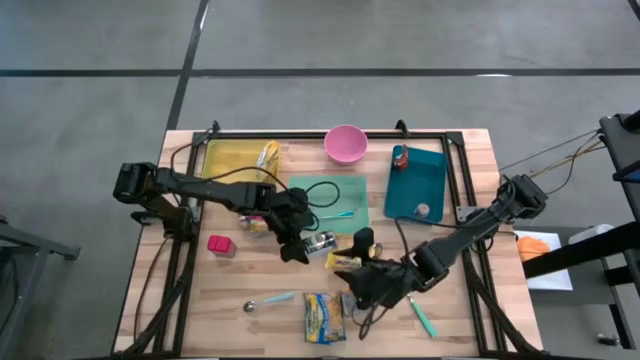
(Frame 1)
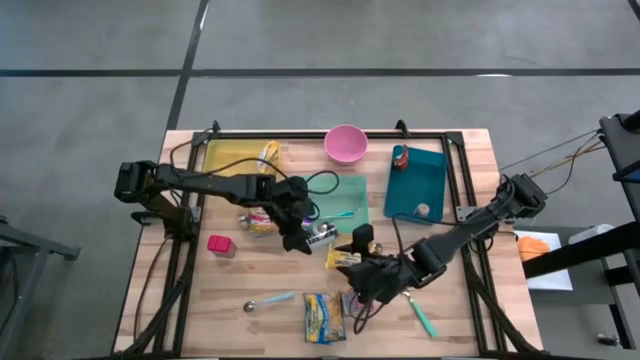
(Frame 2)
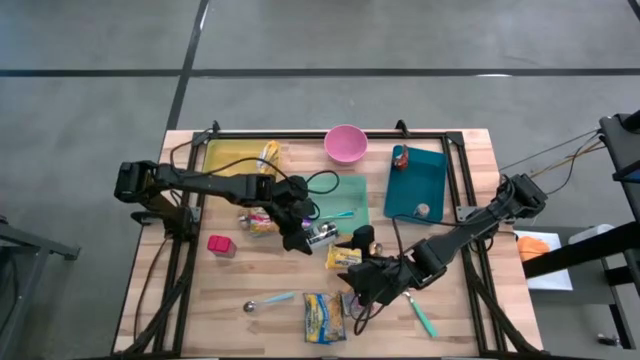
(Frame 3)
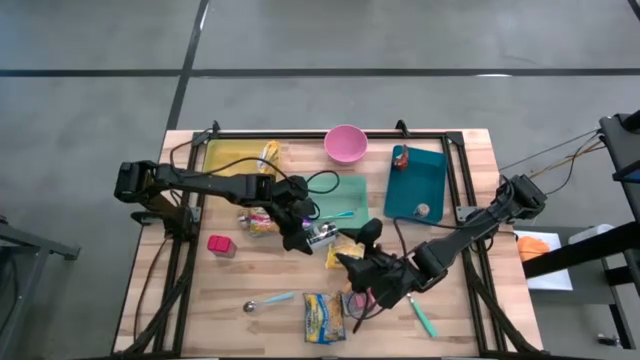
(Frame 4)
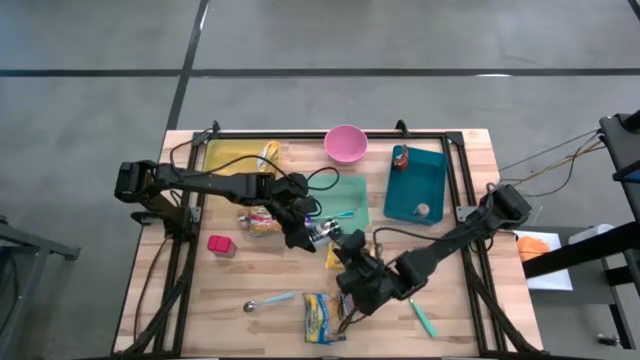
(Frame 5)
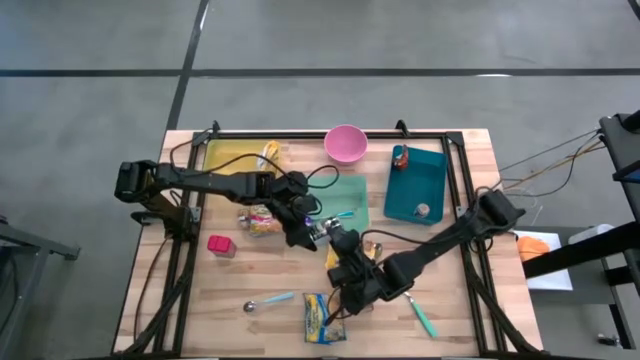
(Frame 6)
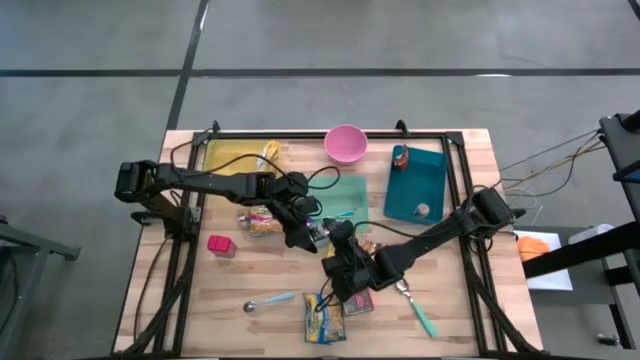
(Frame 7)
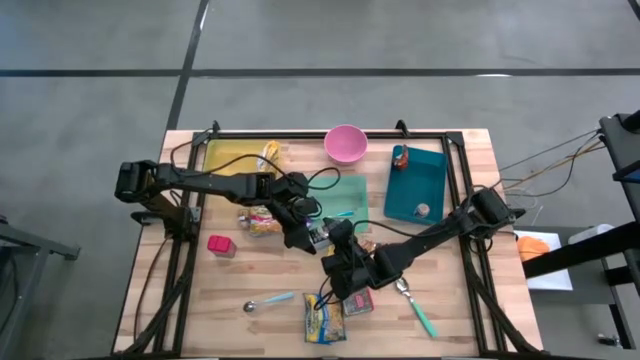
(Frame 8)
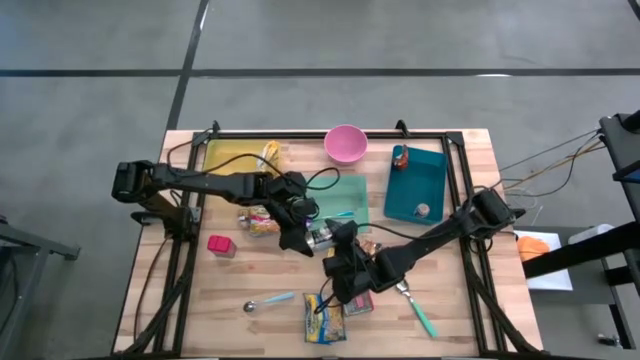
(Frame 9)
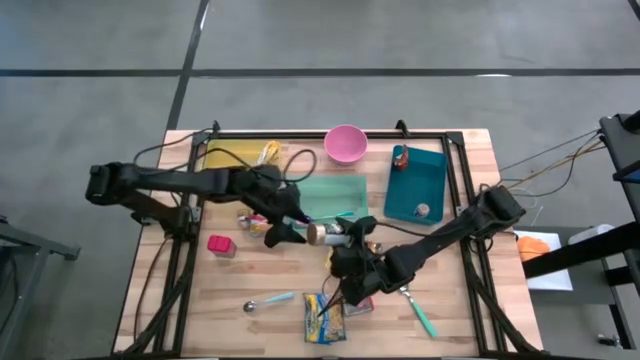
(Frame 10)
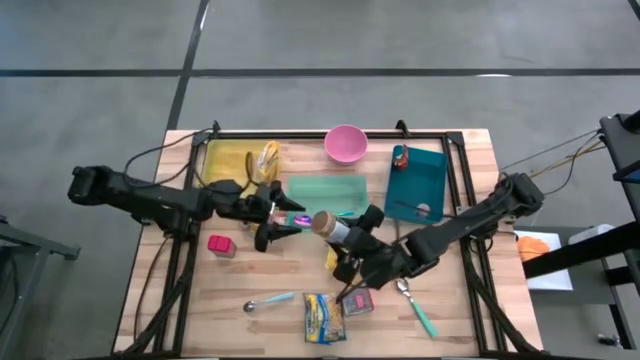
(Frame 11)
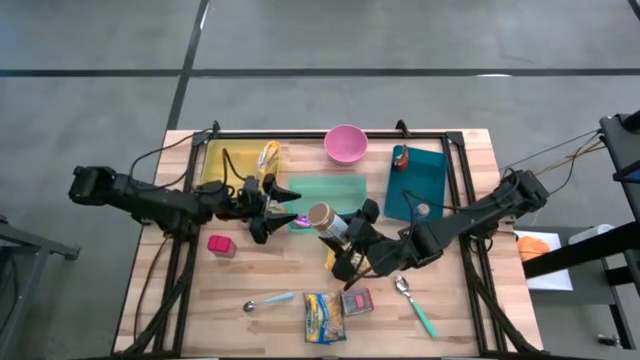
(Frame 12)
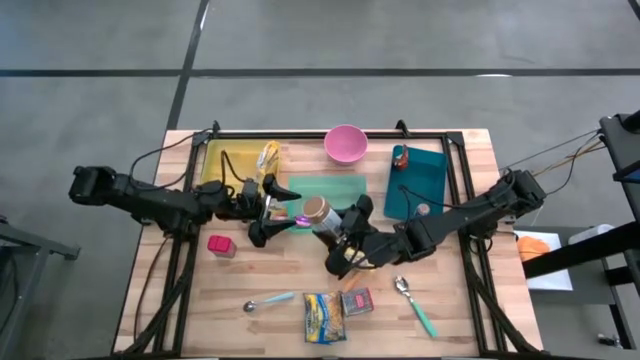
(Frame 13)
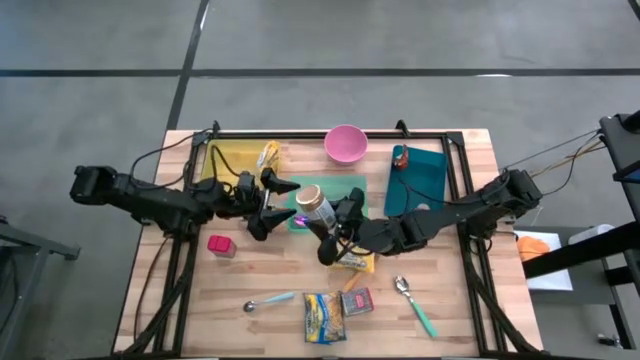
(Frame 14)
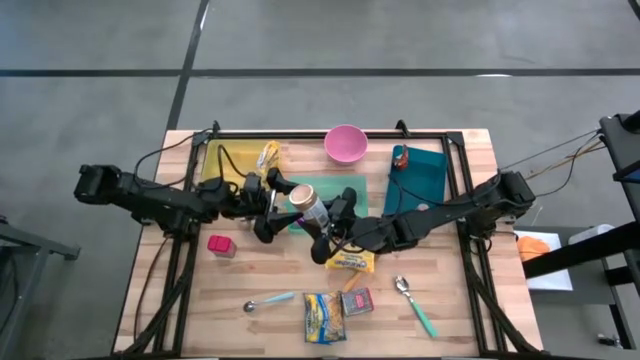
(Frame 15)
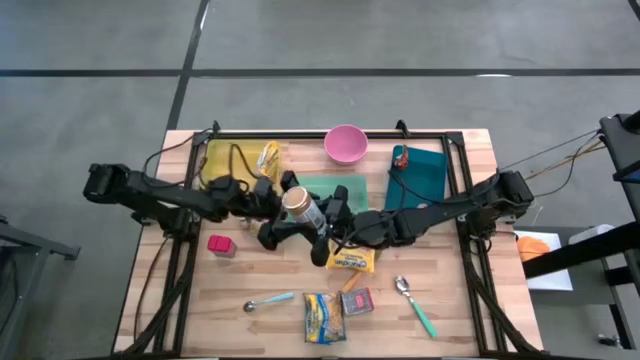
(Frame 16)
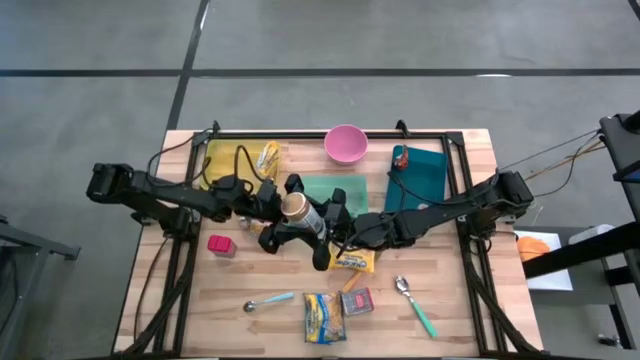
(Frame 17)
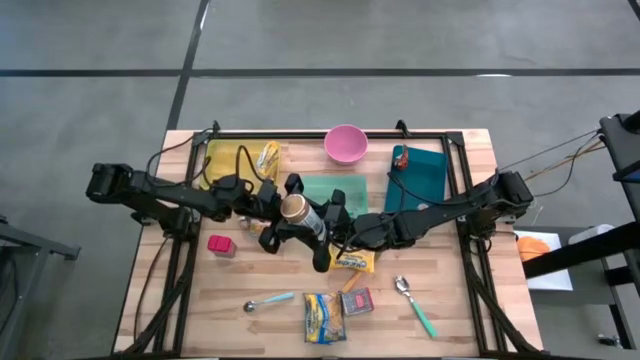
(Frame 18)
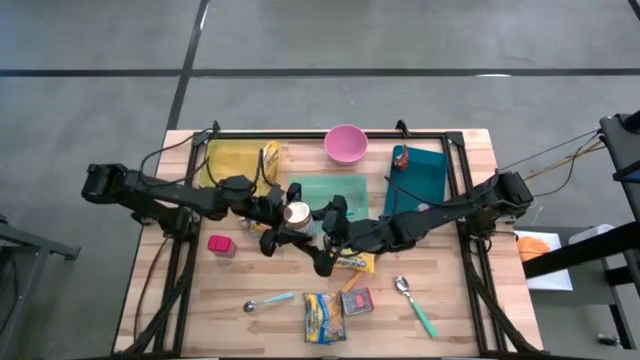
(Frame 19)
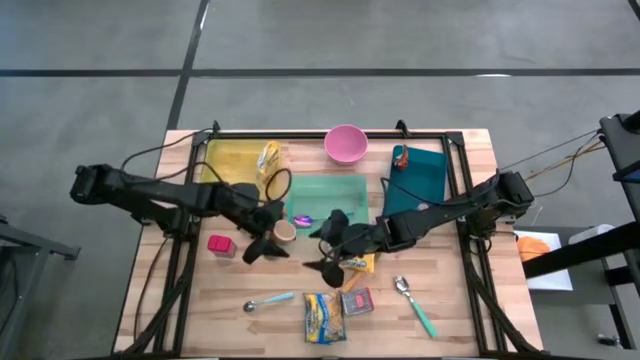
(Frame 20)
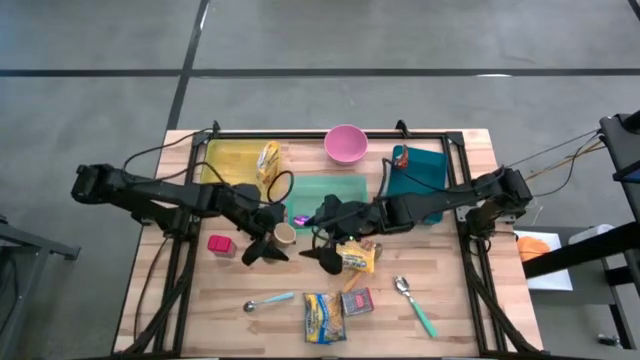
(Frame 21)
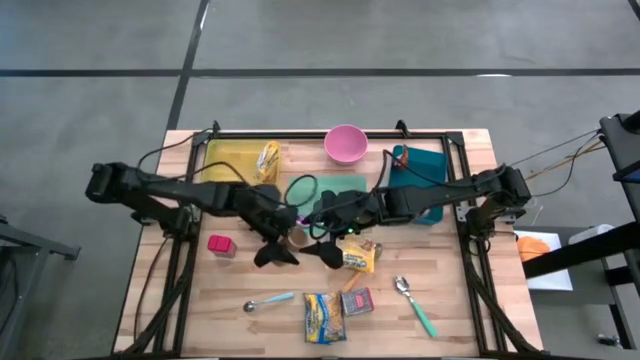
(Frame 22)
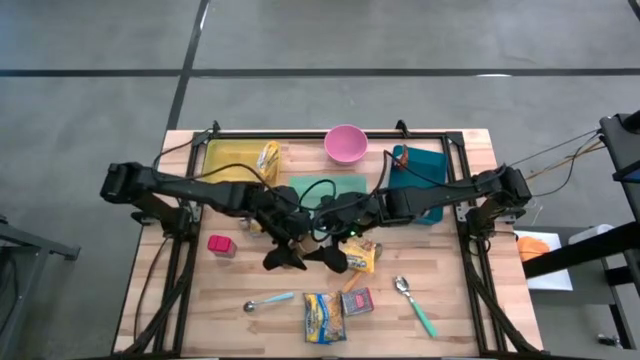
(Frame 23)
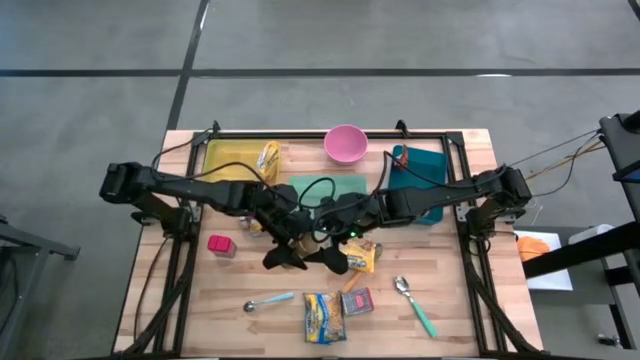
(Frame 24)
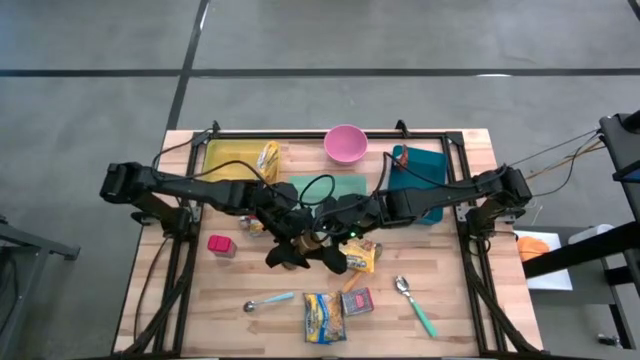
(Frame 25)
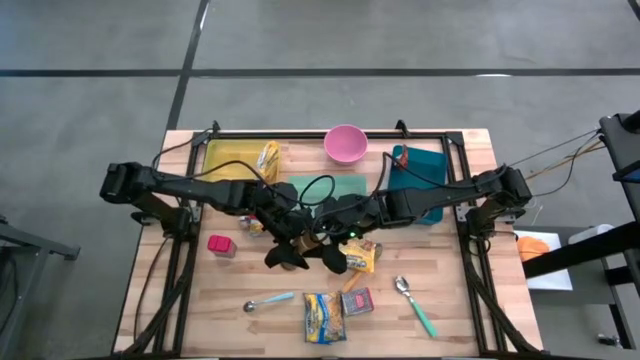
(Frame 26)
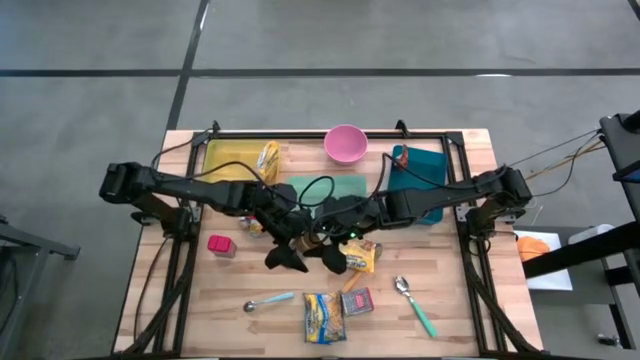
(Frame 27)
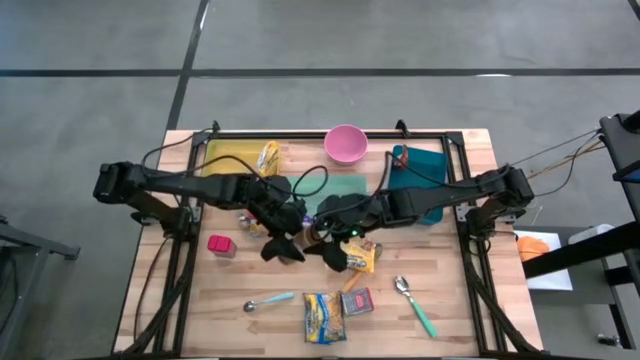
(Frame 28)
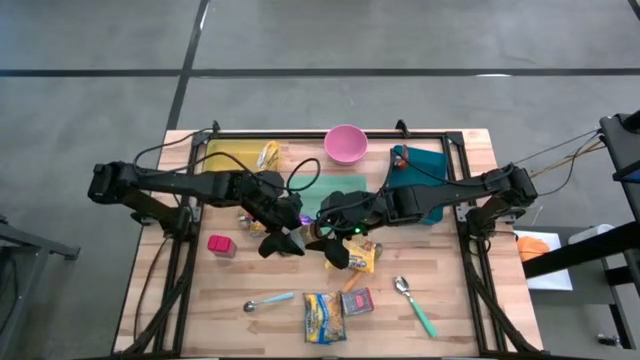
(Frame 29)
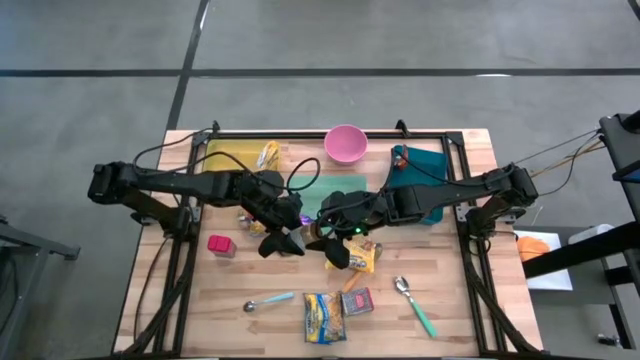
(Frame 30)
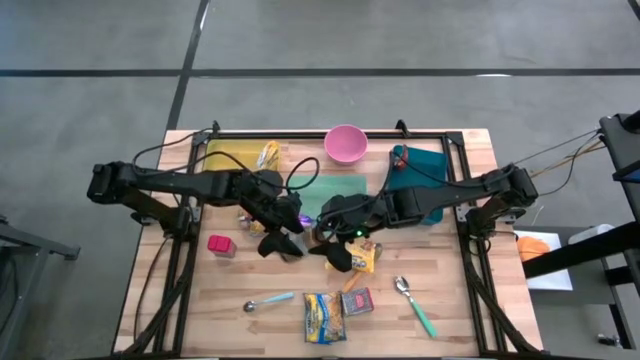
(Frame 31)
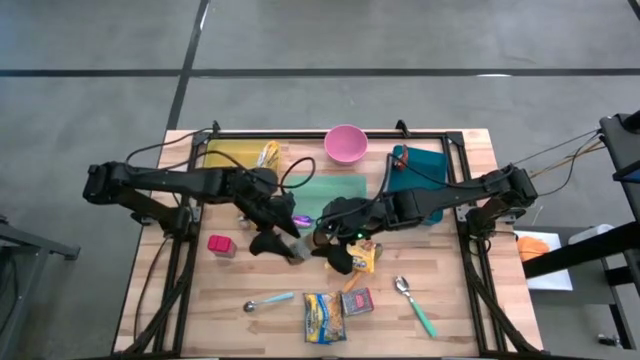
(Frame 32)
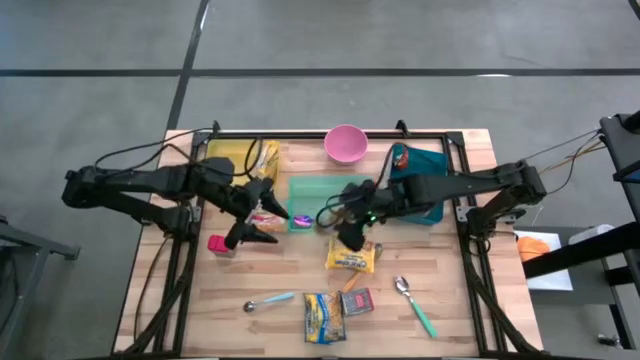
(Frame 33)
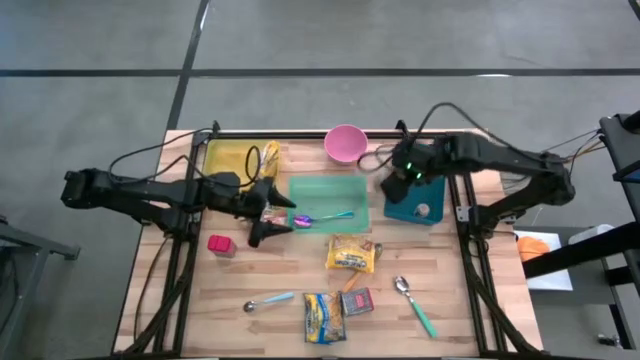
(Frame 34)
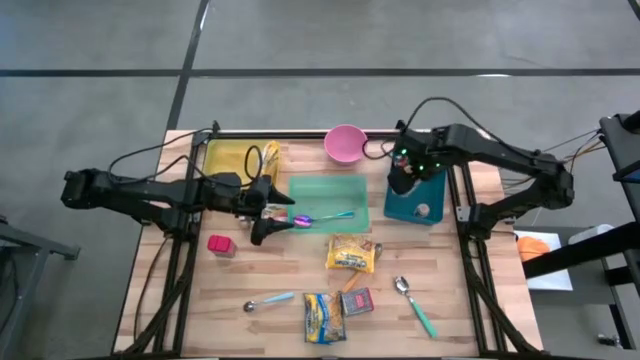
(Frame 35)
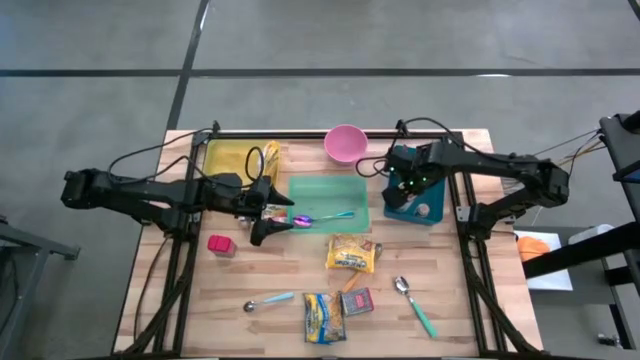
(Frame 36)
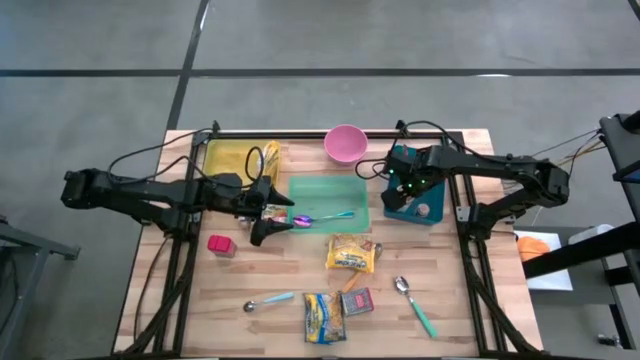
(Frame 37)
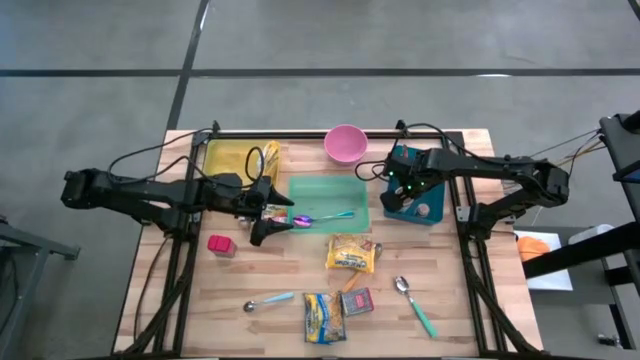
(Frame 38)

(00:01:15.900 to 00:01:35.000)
Put the gold seasoning bottle into the blue bin
